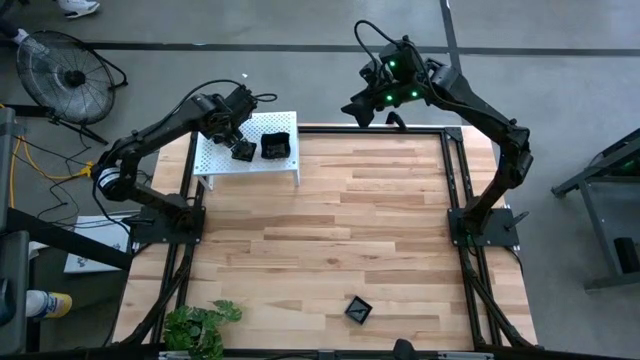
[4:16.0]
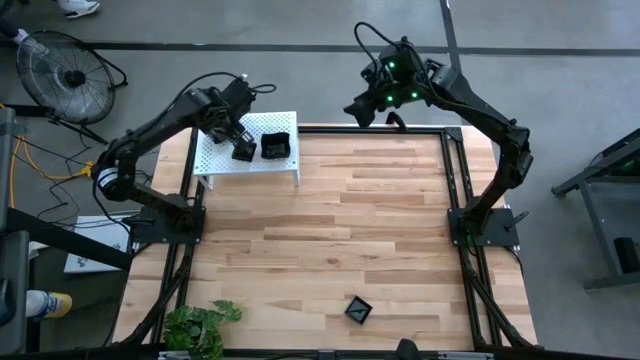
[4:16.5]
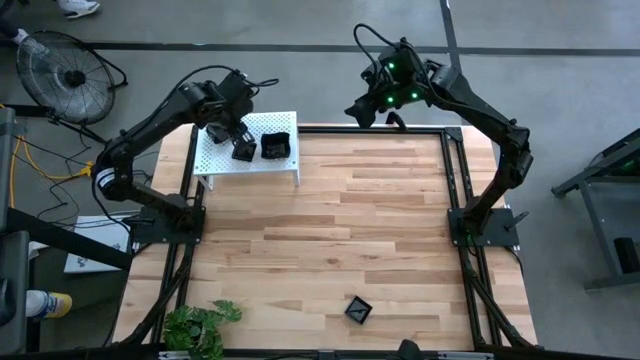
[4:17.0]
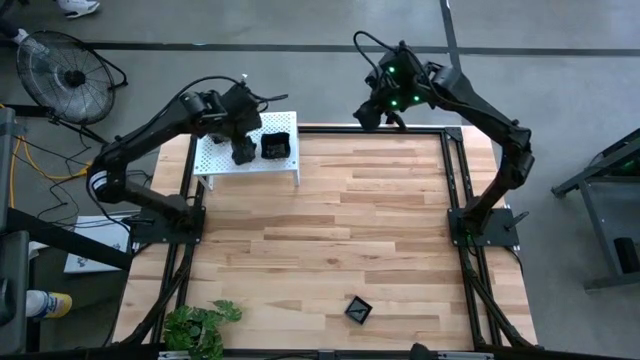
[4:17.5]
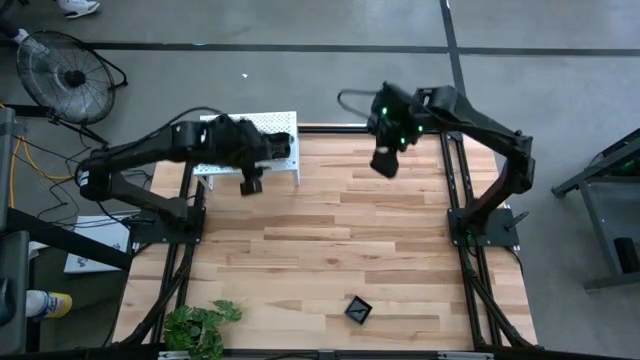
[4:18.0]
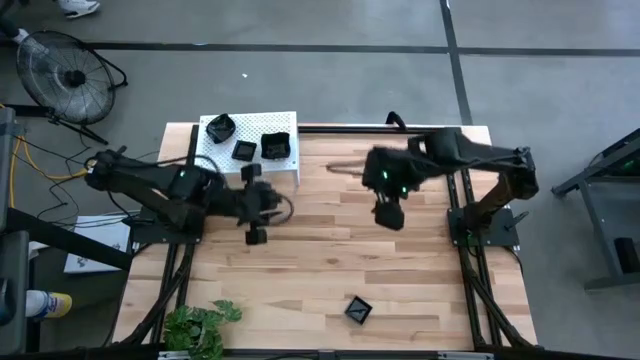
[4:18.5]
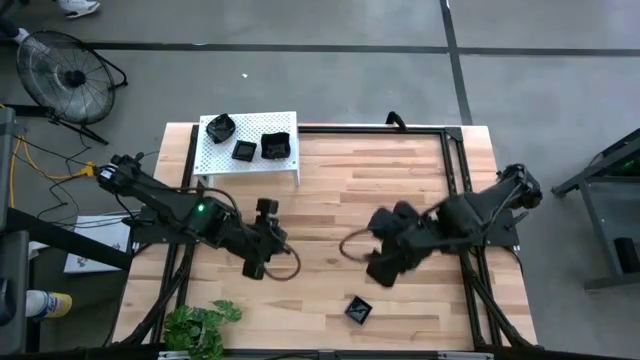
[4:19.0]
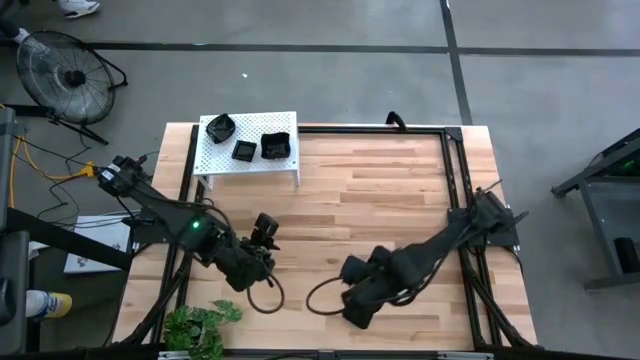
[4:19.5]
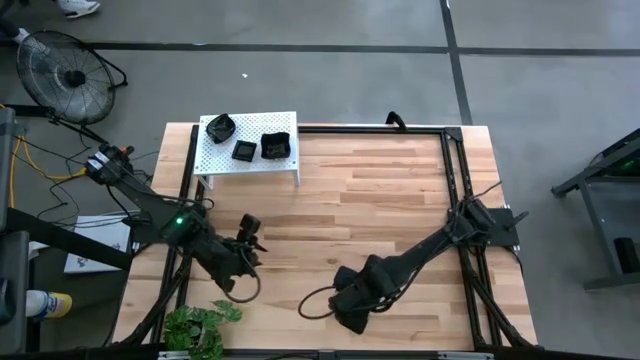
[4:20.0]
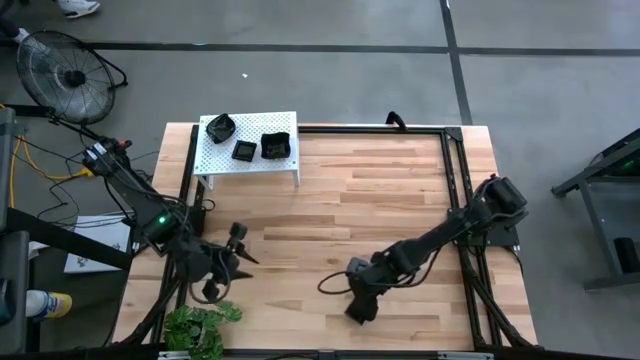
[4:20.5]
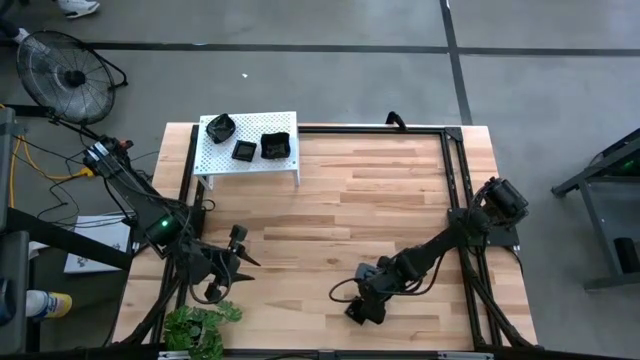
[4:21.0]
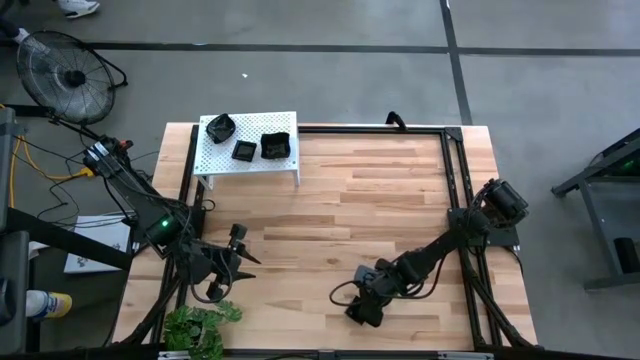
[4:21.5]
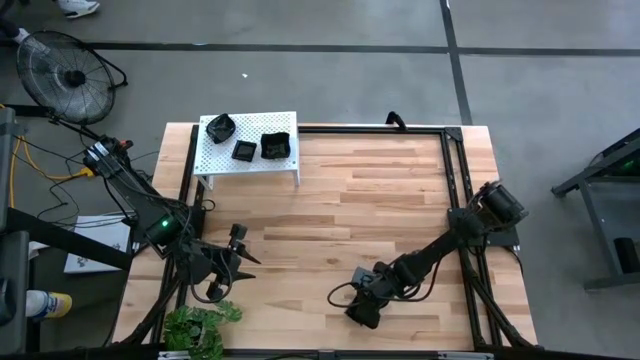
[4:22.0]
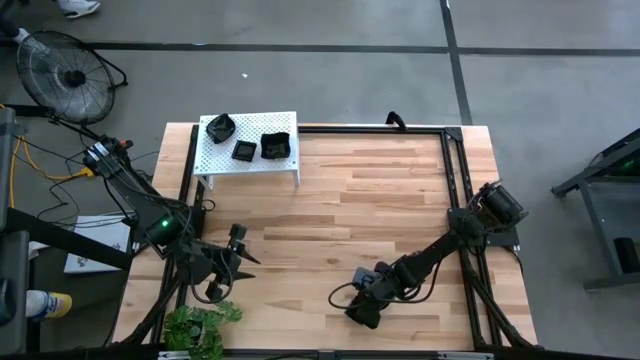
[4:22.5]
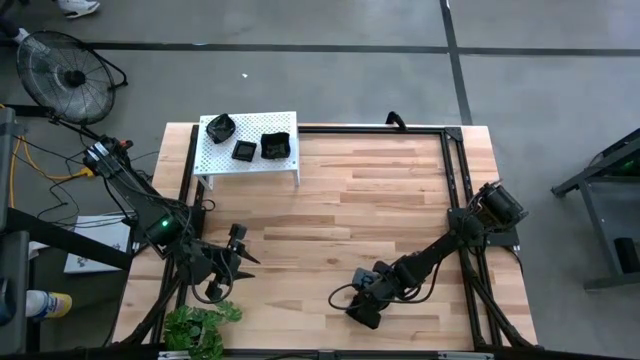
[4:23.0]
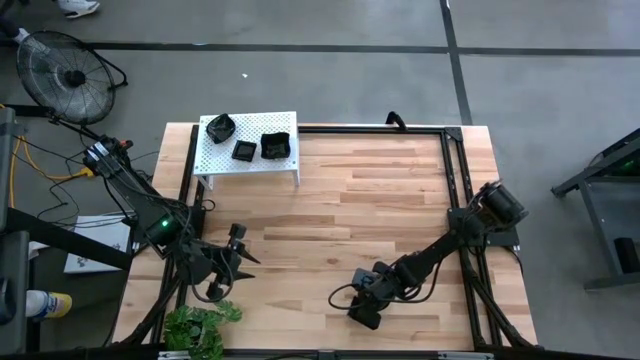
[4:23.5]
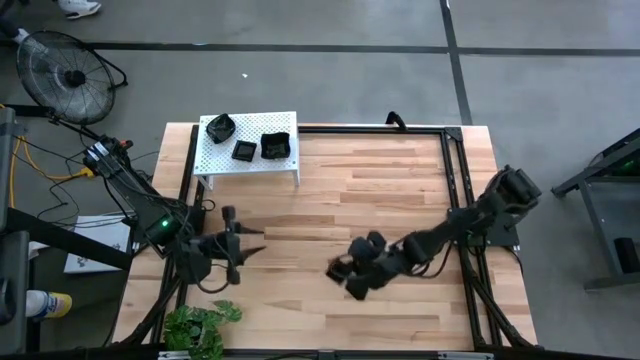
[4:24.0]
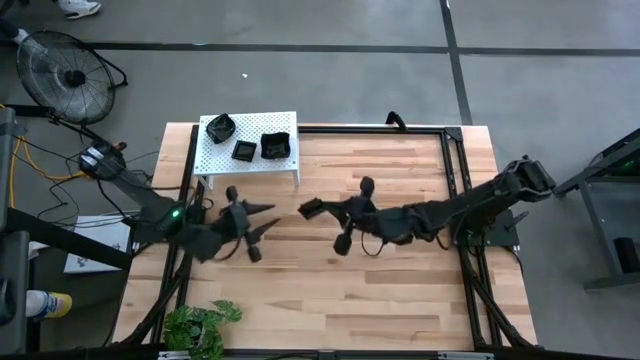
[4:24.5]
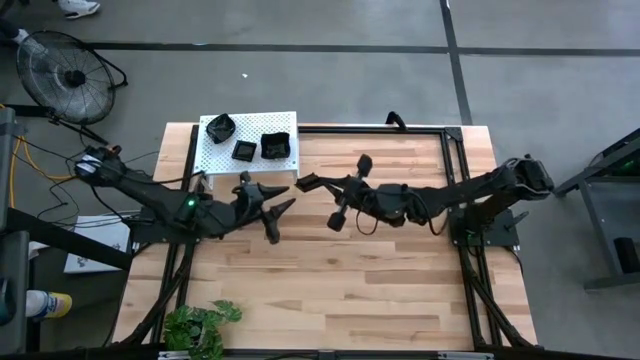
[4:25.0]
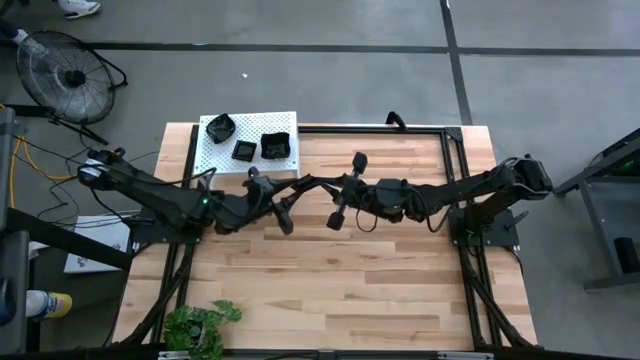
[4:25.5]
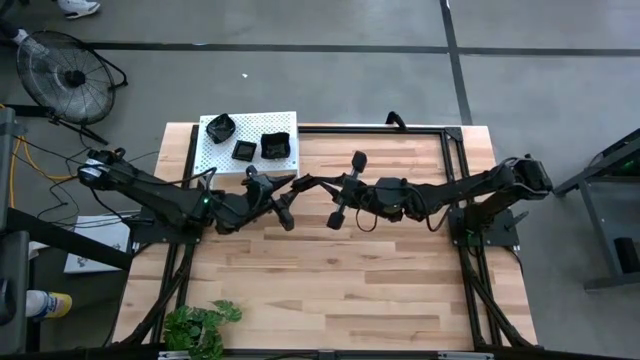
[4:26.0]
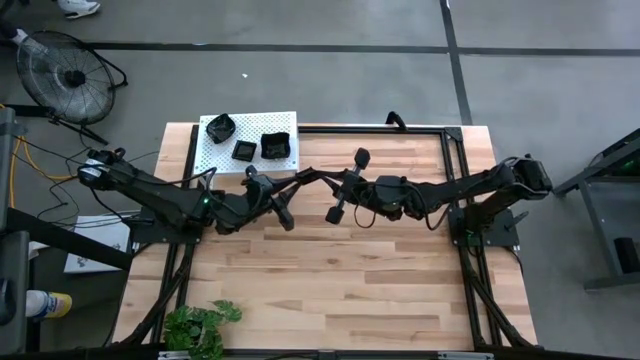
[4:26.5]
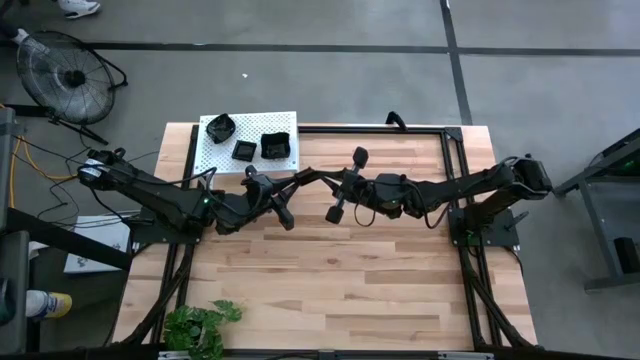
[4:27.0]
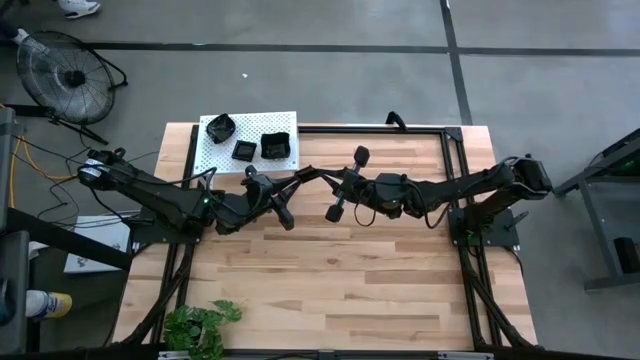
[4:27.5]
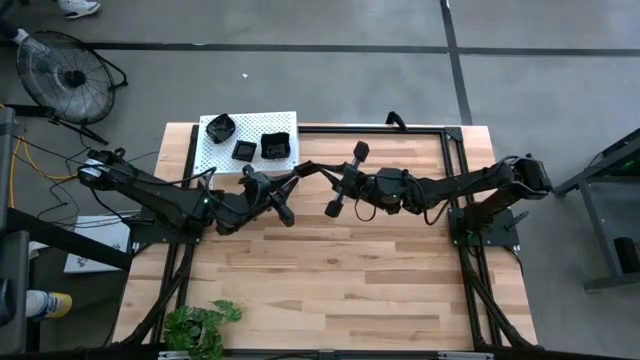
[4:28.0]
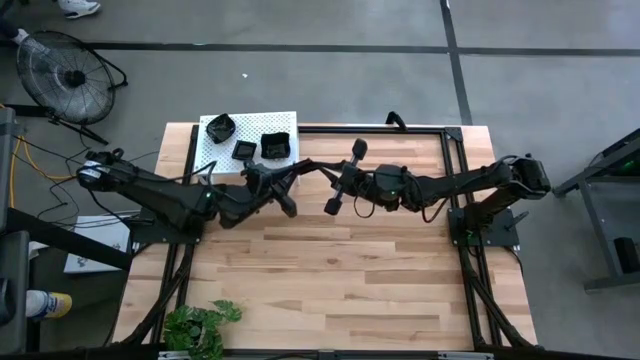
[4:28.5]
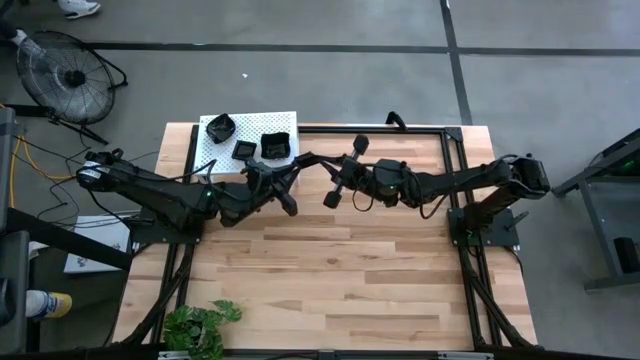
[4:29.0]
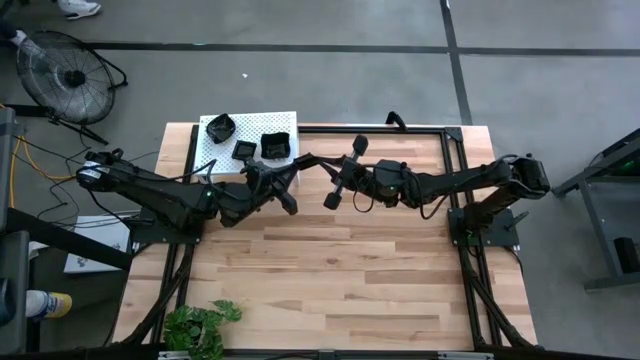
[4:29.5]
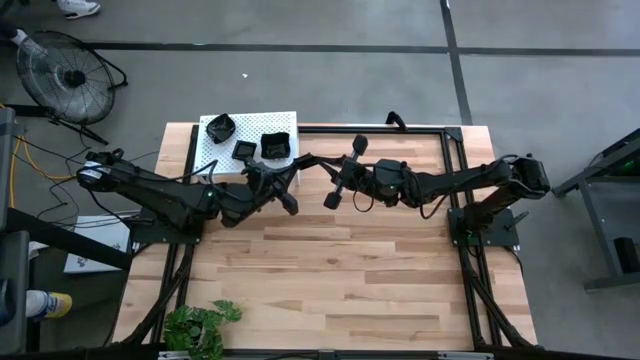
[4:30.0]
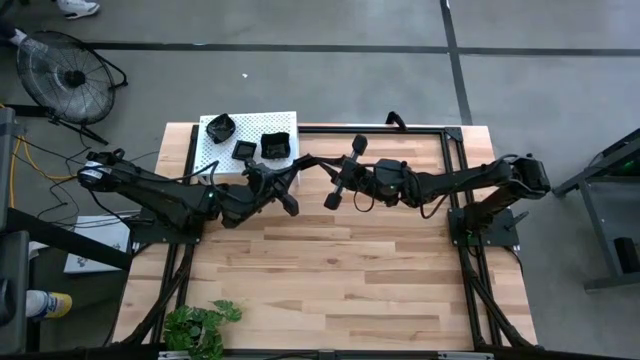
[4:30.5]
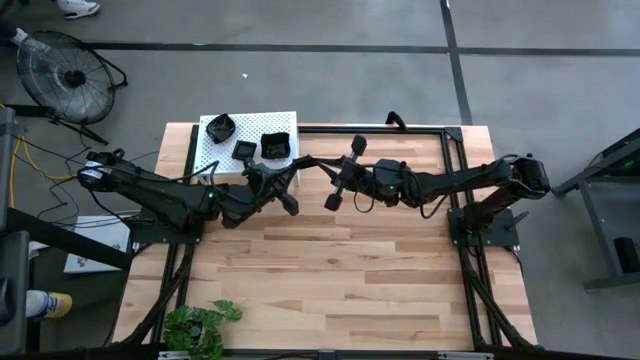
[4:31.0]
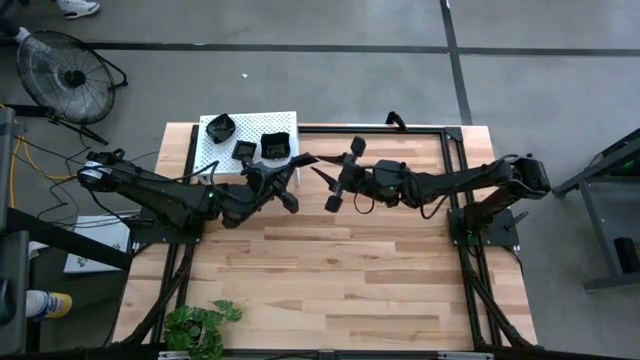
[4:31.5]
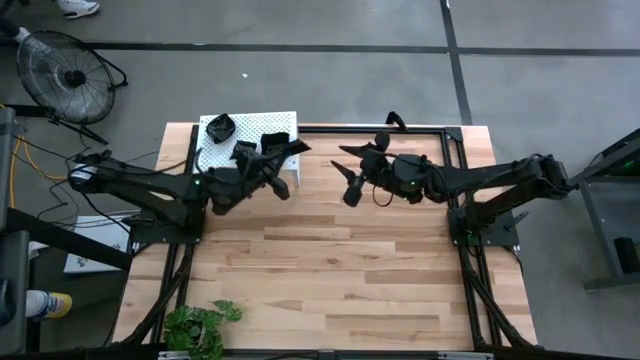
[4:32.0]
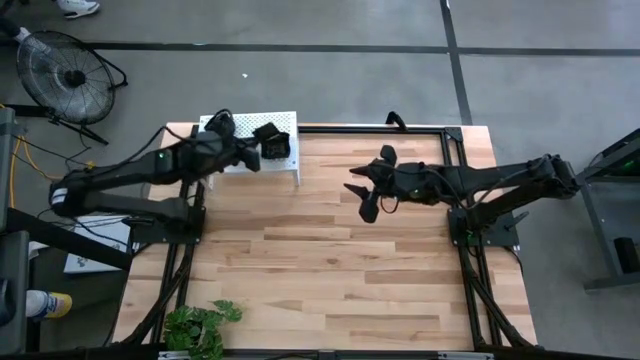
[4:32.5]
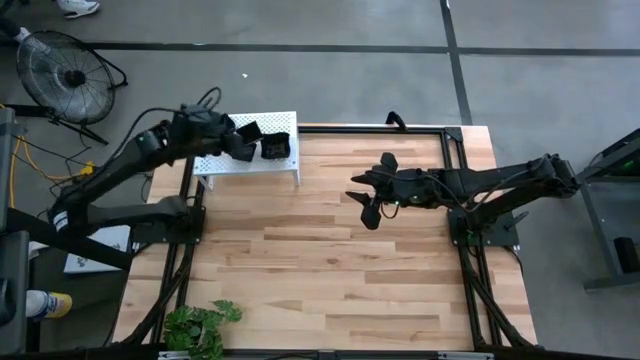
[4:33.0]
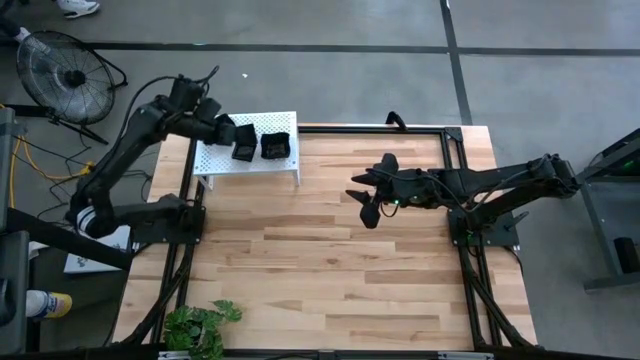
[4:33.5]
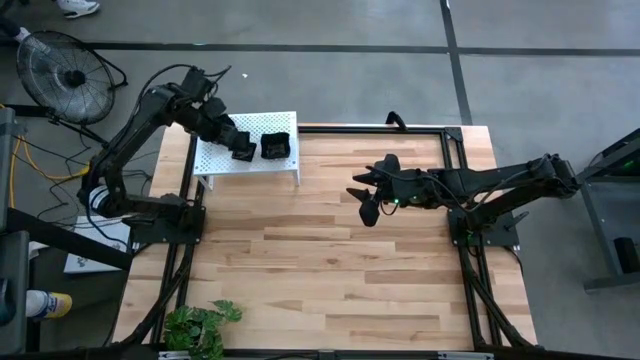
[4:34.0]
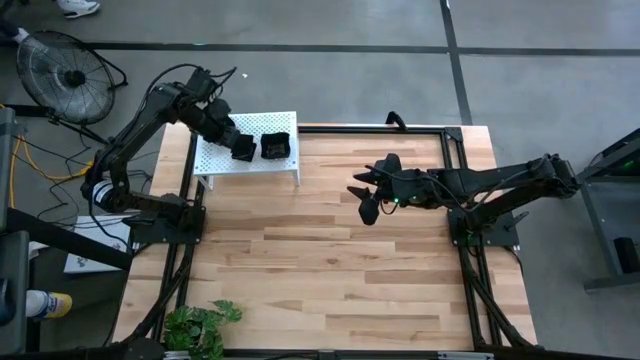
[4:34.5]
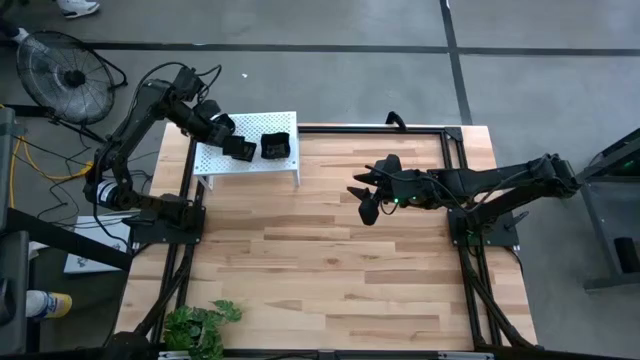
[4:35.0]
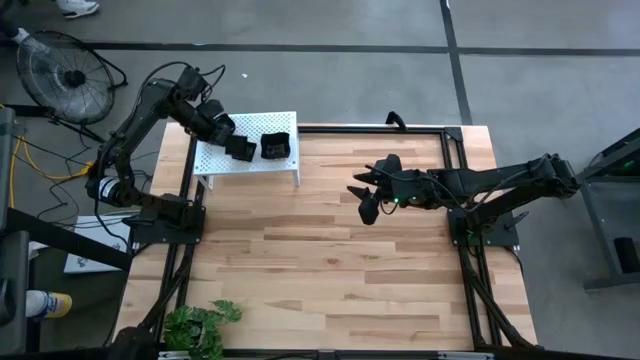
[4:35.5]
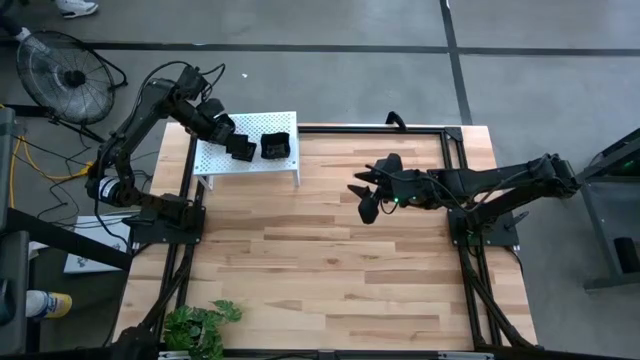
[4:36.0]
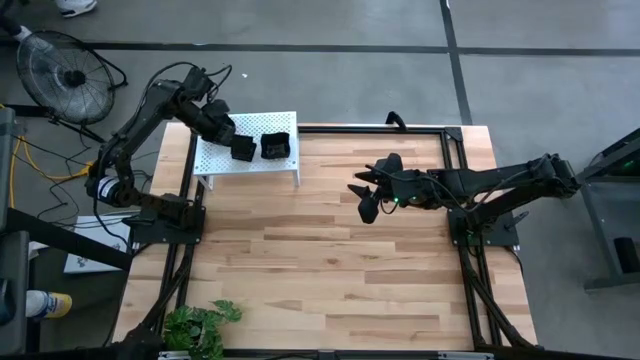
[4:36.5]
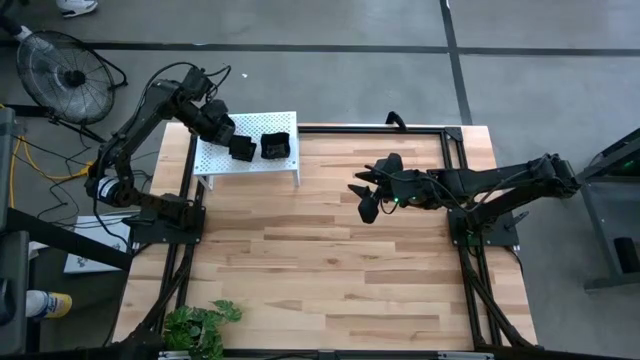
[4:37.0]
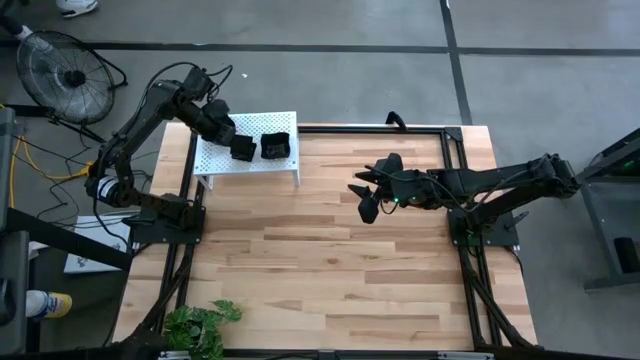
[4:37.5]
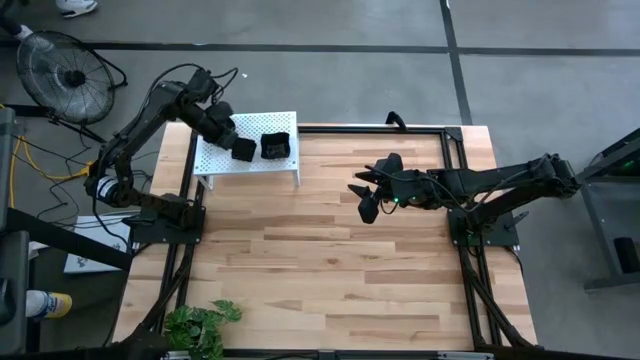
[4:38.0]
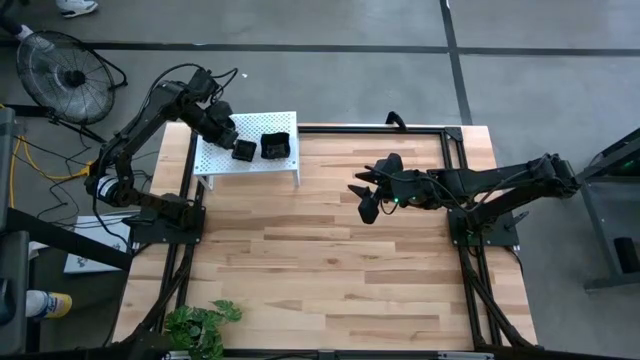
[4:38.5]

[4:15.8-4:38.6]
Task: Pick & Place Mini shaped plates
Stack the black square plate on top of the black square plate on the shelf
